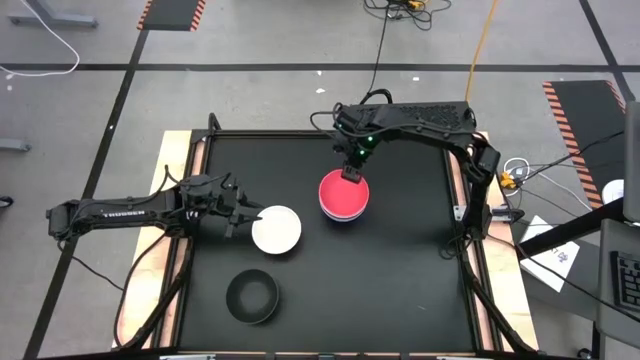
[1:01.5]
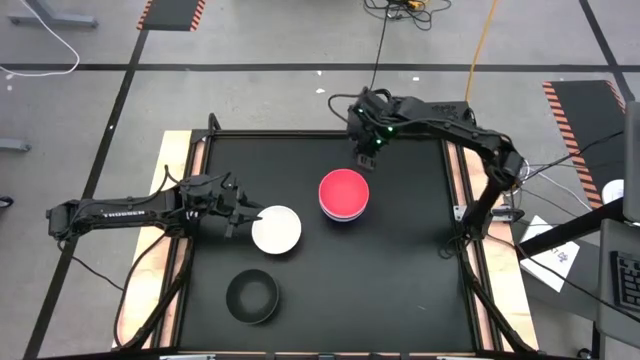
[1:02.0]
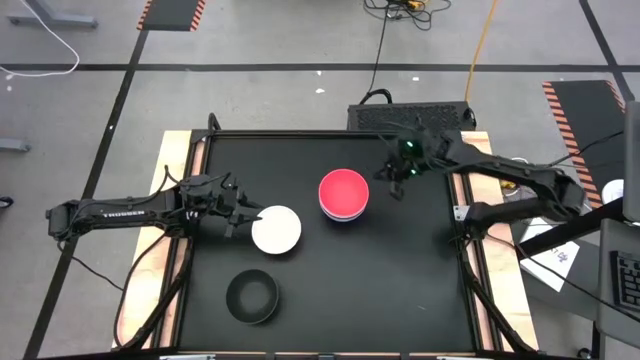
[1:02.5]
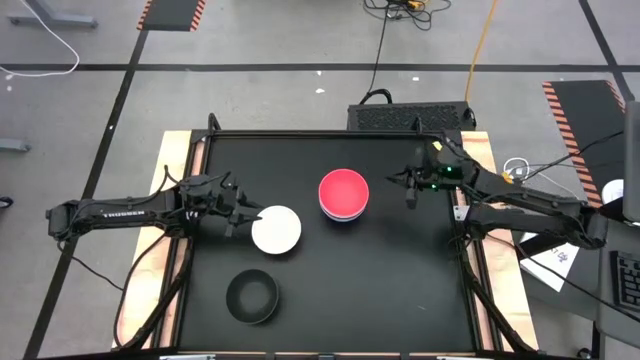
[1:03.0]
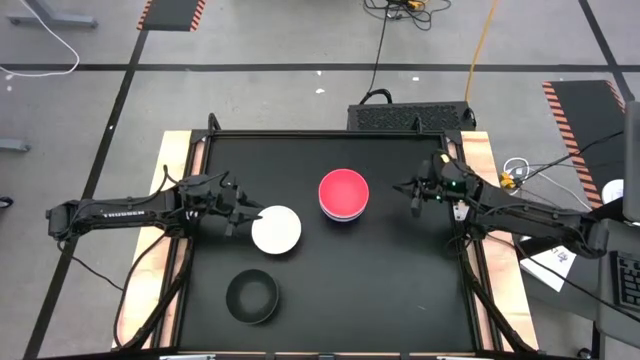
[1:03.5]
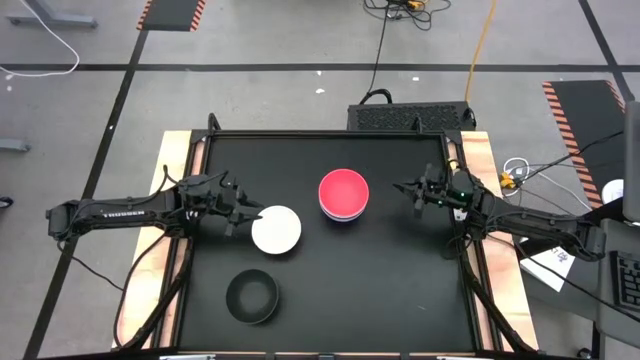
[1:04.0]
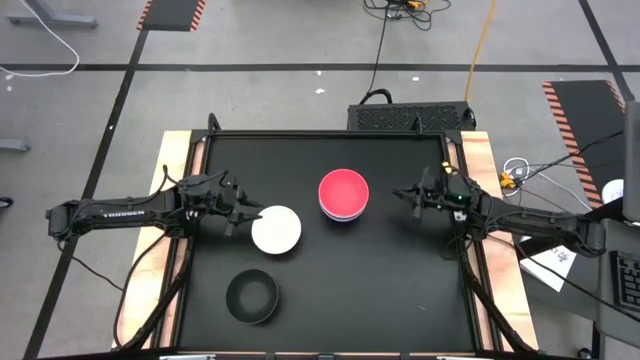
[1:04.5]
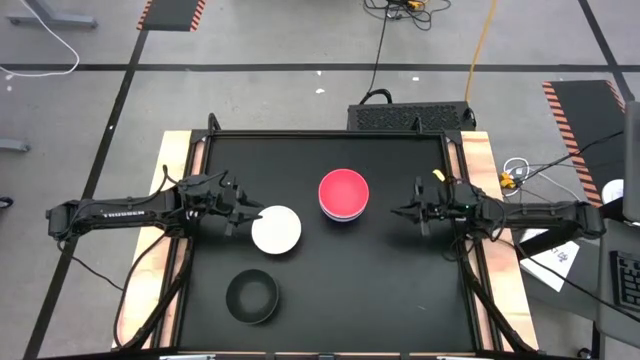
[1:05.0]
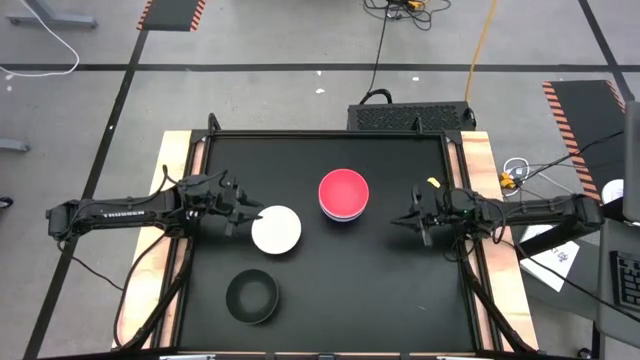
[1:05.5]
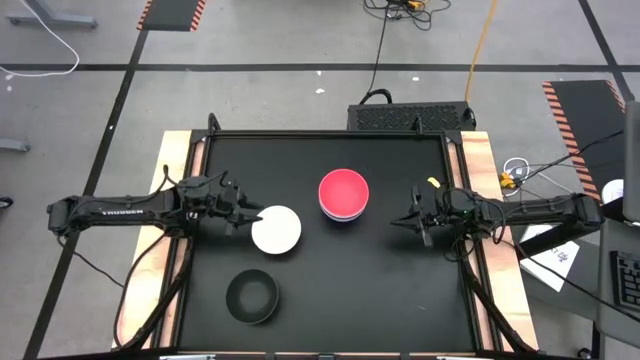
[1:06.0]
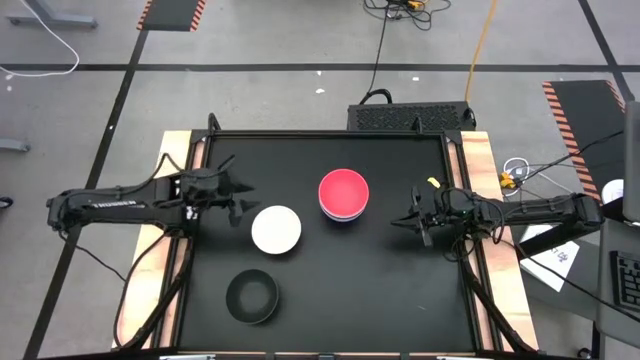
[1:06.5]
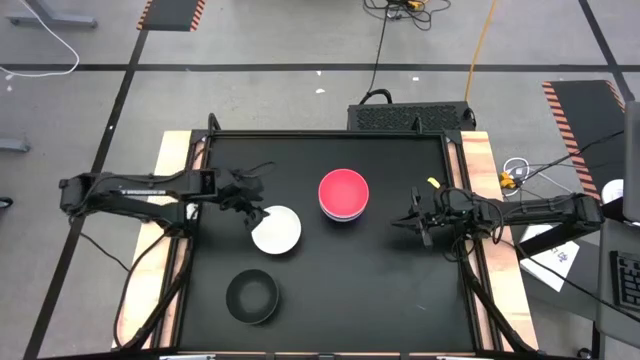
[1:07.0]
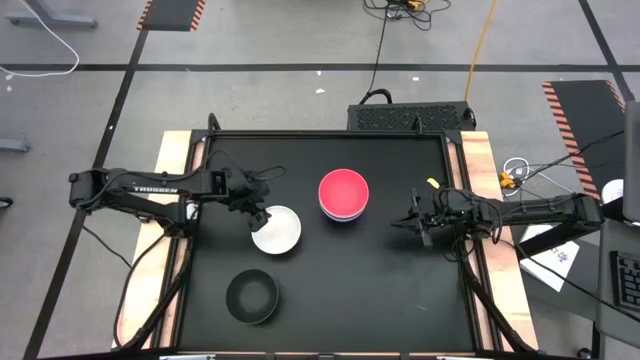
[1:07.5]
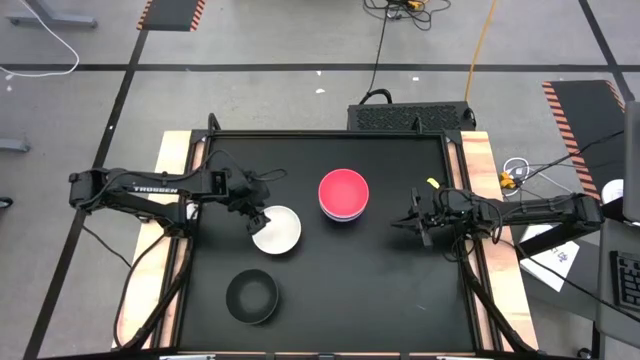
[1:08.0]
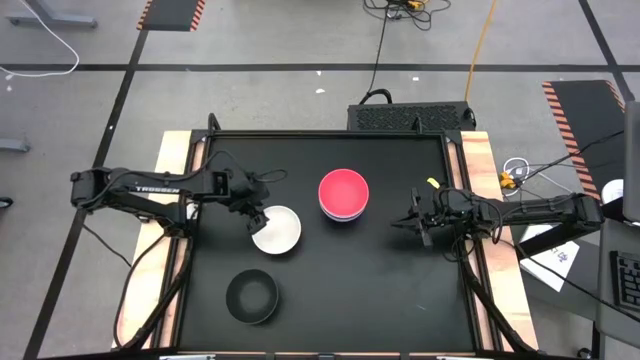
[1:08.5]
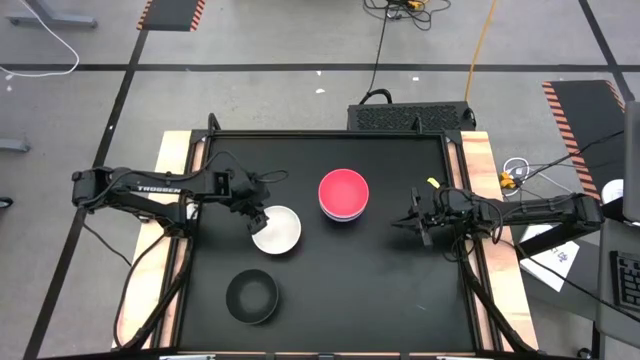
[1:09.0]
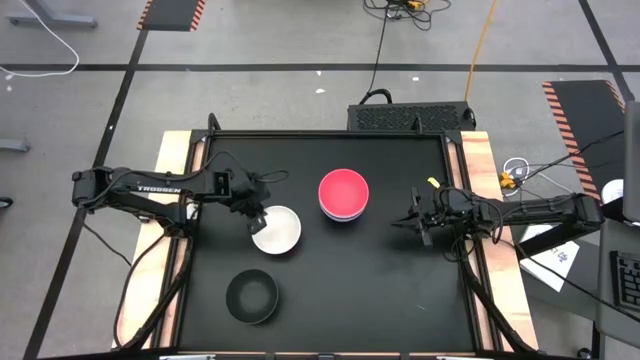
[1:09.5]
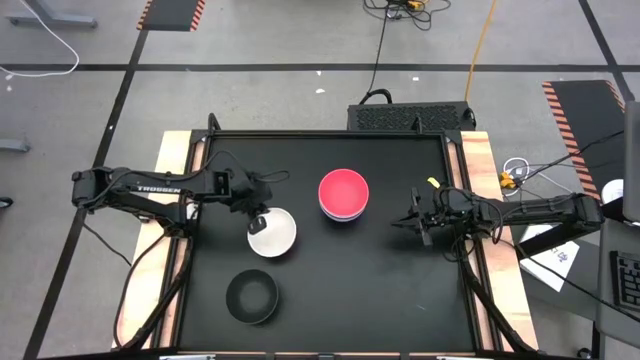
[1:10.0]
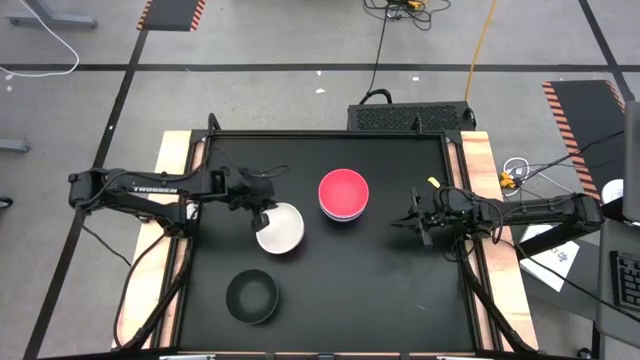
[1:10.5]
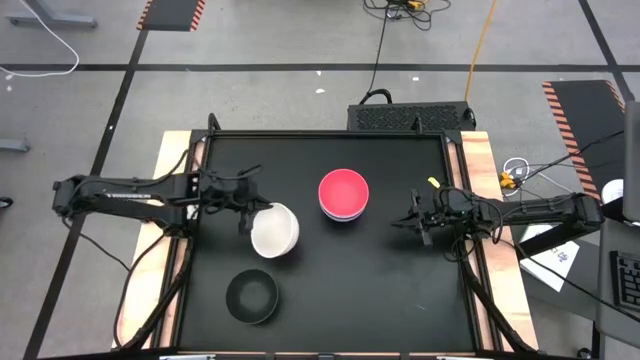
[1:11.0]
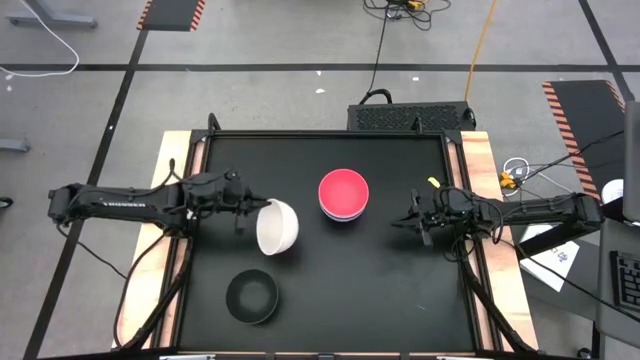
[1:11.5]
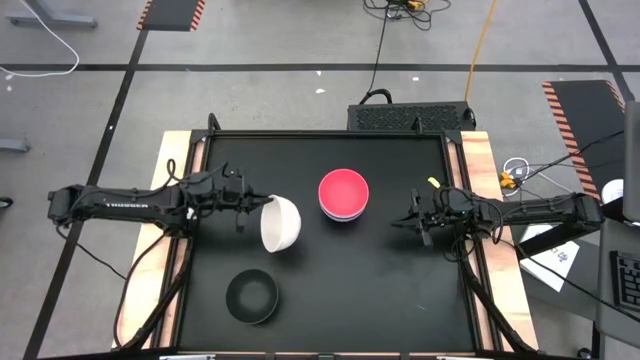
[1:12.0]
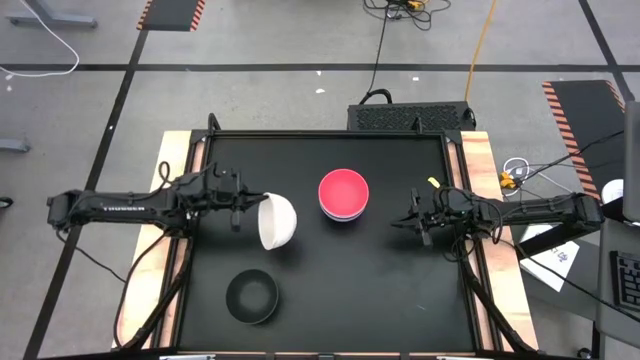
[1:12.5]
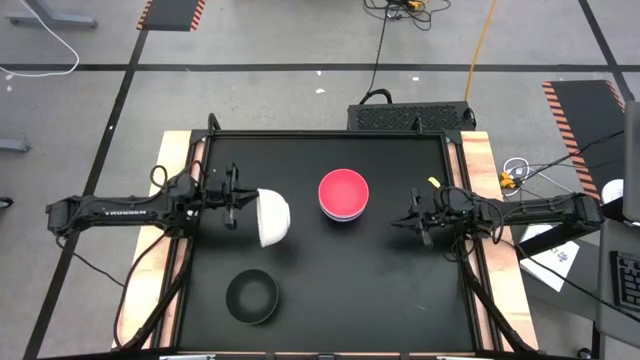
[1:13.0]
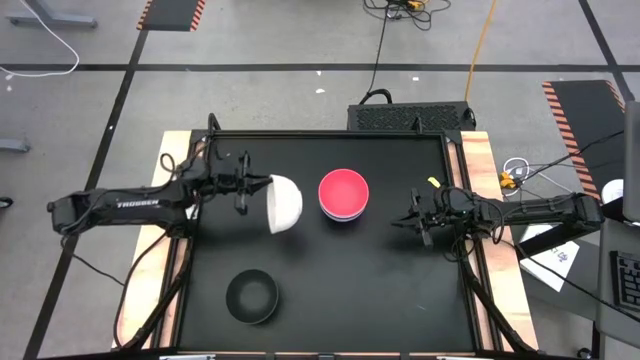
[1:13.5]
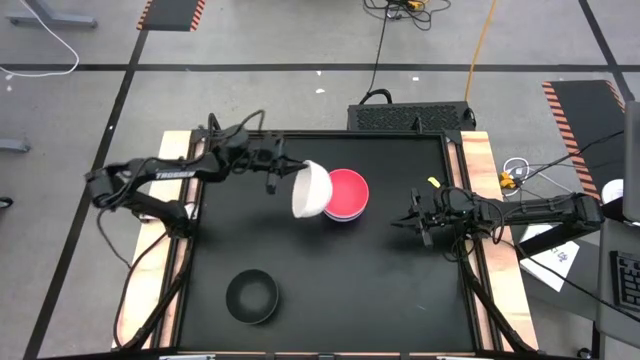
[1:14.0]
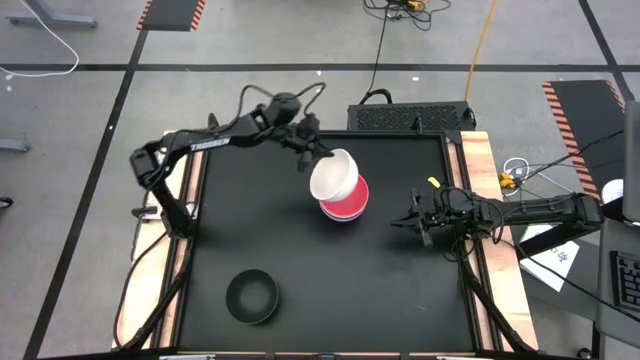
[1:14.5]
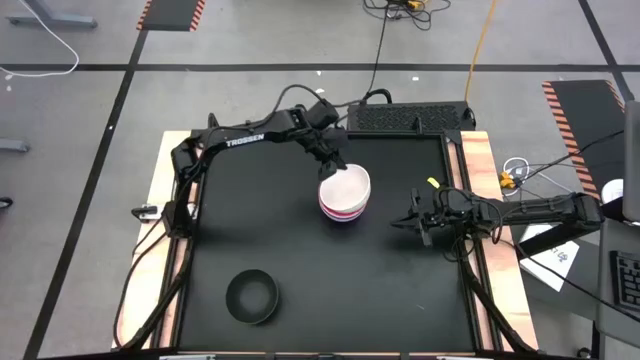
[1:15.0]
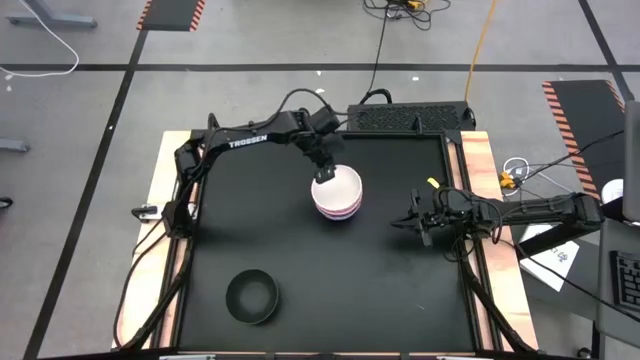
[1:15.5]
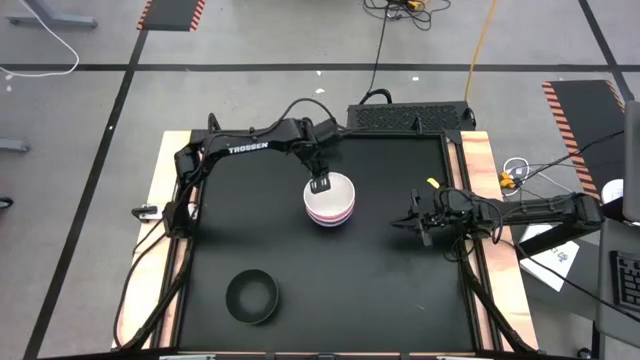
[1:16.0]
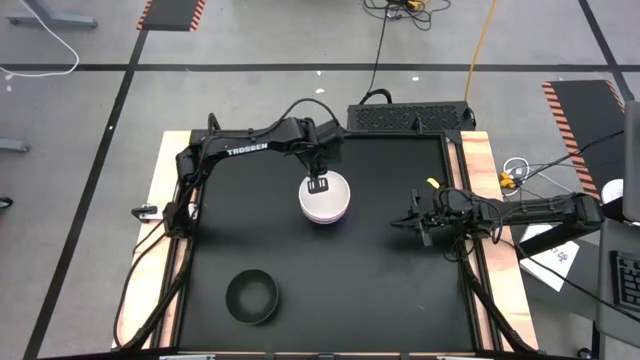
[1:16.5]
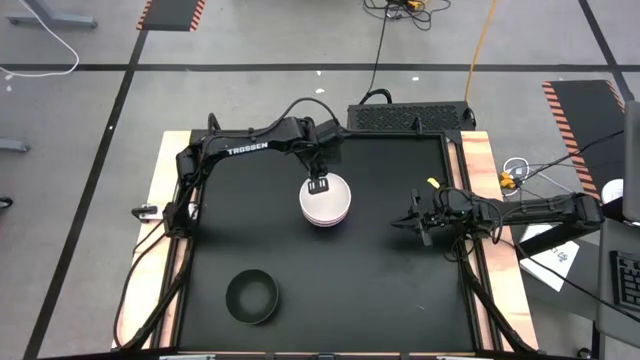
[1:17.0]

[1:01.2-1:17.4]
Task: Nest bowls inside each other
Stack the white bowl on top of the orange bowl

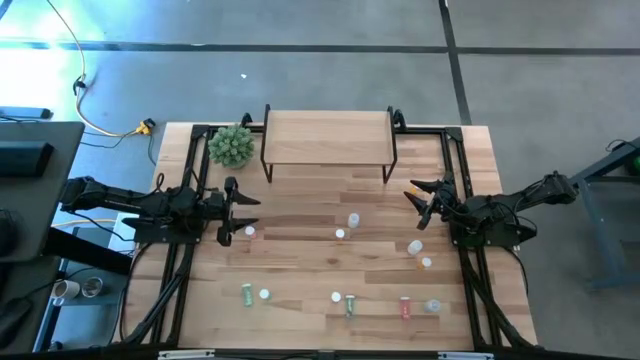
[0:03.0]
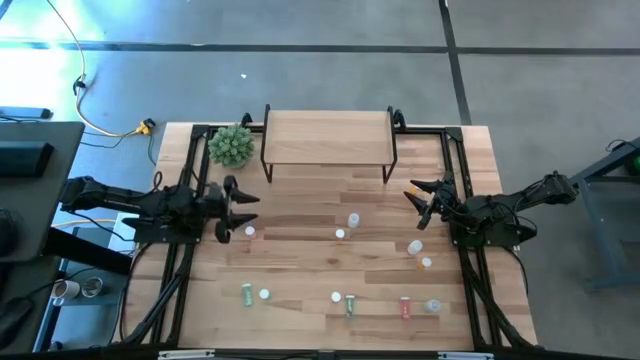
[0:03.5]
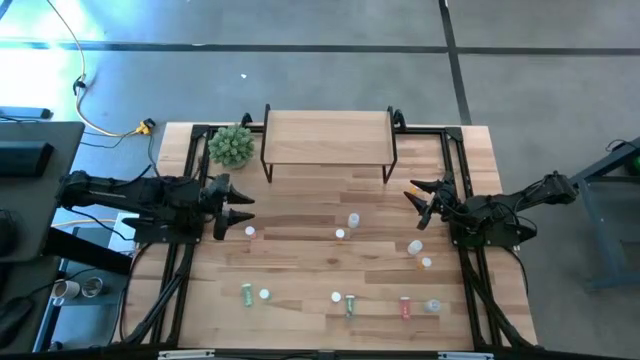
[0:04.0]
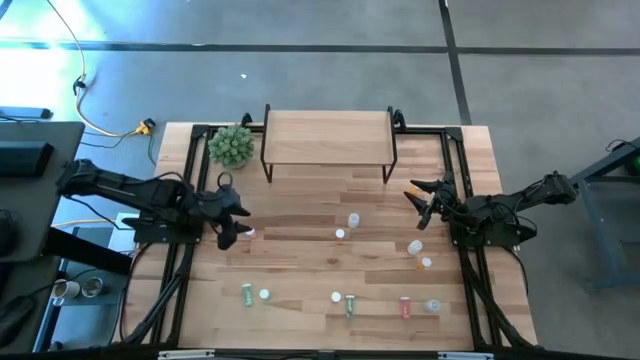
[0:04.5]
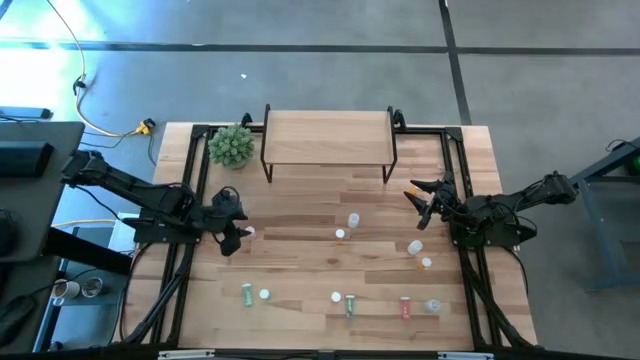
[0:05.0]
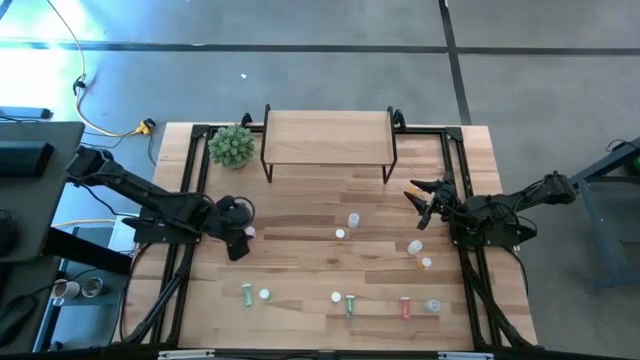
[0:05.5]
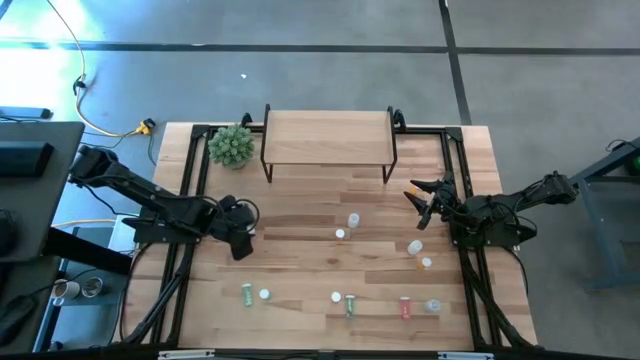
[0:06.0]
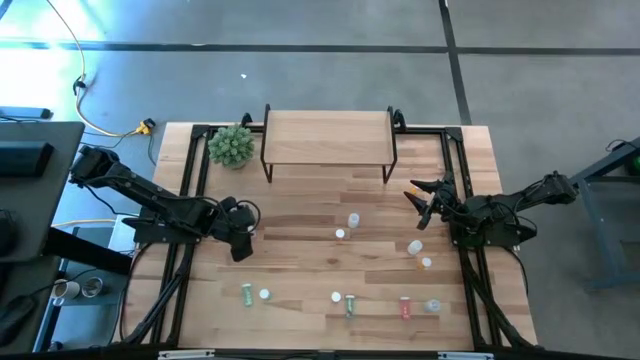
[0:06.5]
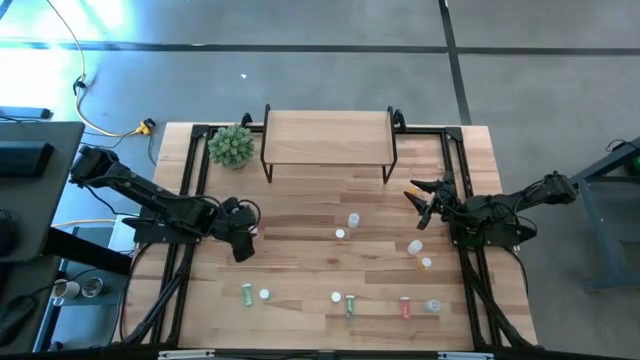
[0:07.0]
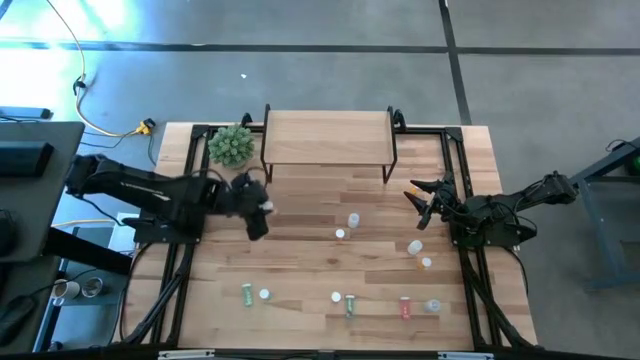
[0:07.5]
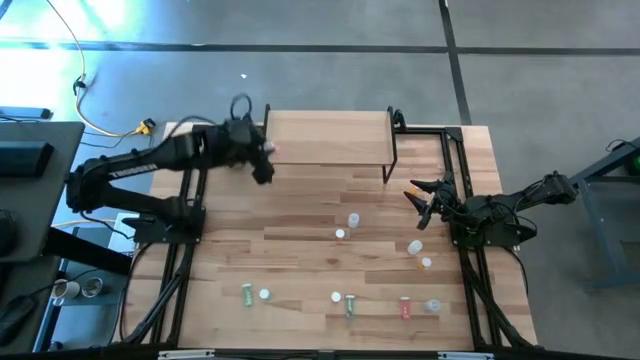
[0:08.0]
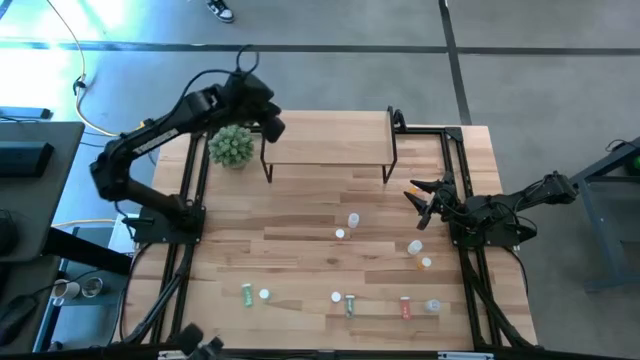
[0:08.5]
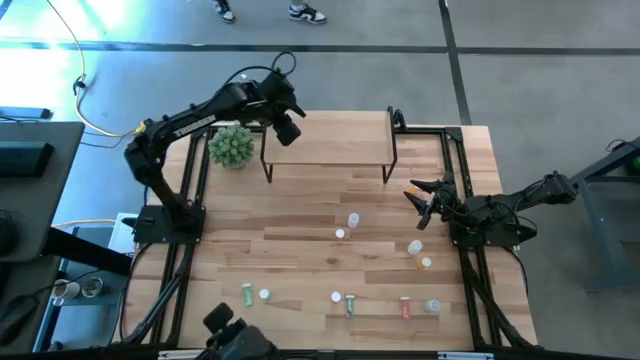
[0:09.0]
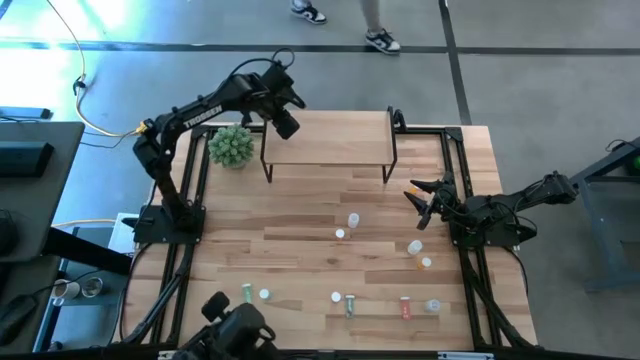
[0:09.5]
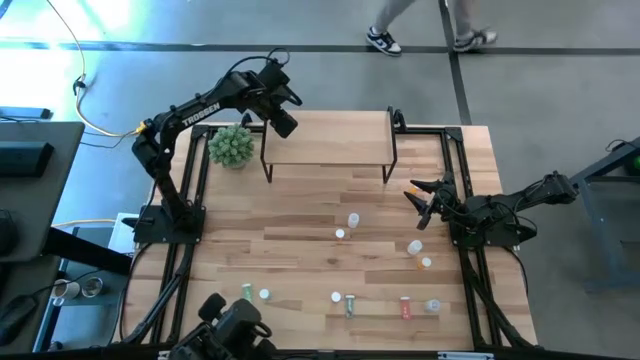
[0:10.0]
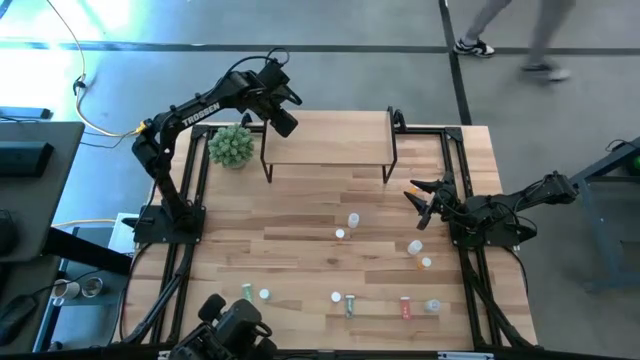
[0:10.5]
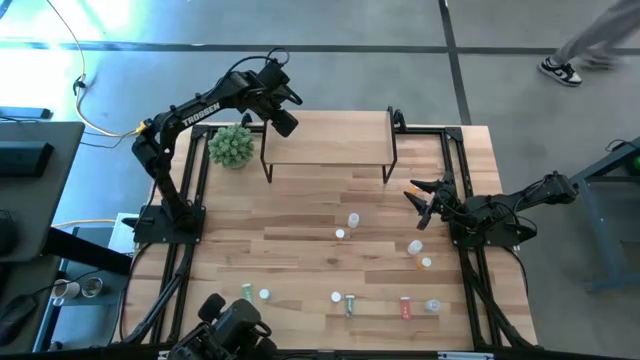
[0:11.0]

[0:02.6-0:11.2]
Task: Pick and place medicine bottles onto shelf by color
Put the left pink pill bottle on the shelf
